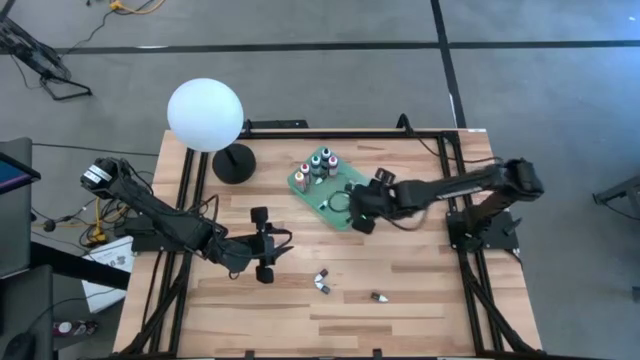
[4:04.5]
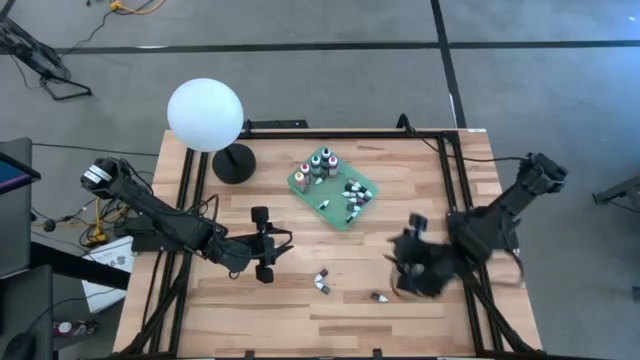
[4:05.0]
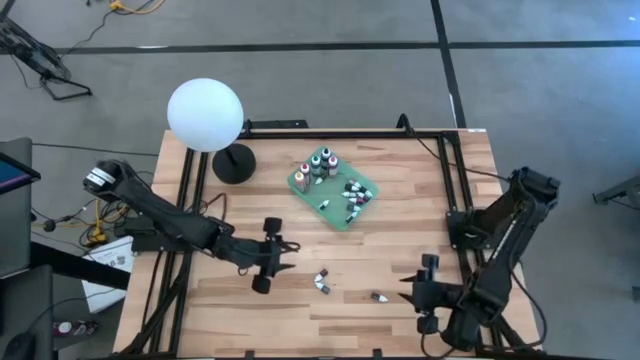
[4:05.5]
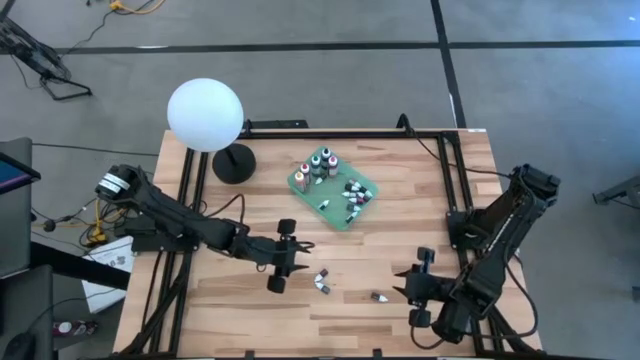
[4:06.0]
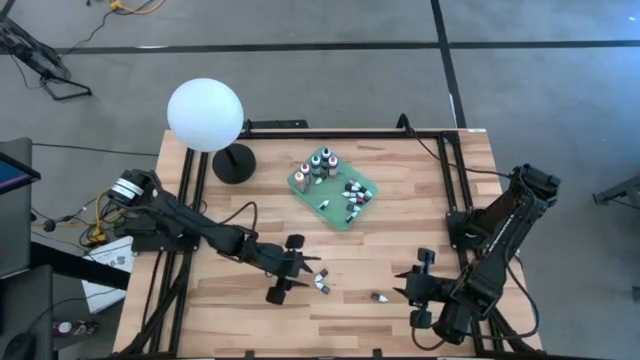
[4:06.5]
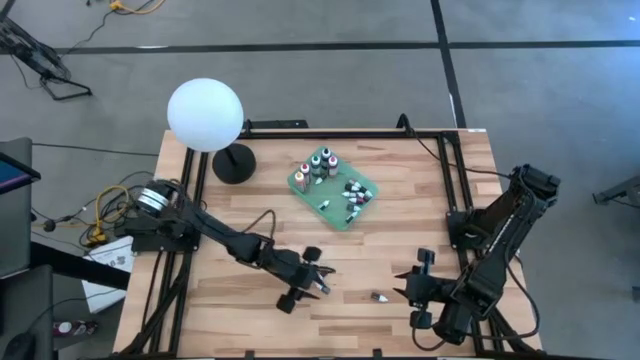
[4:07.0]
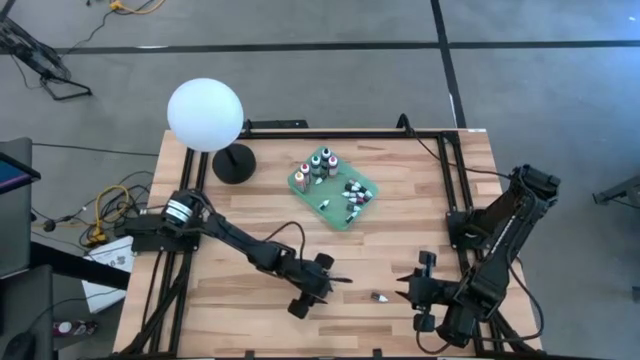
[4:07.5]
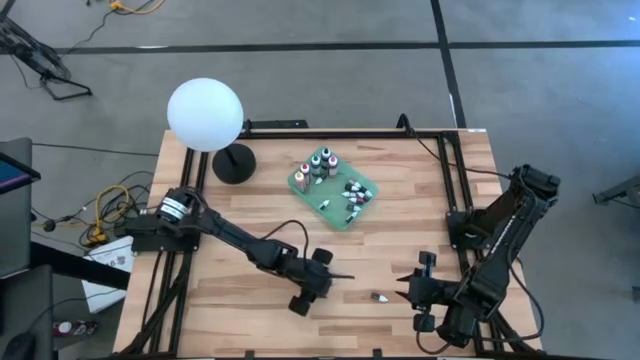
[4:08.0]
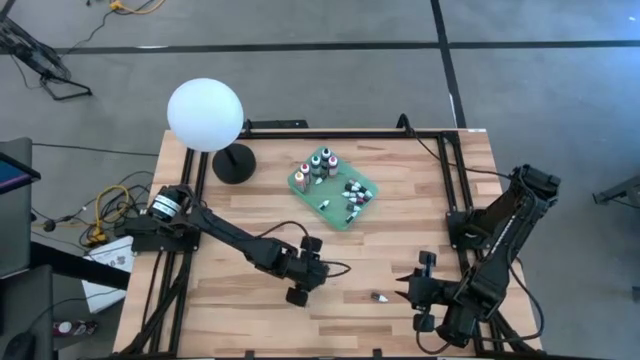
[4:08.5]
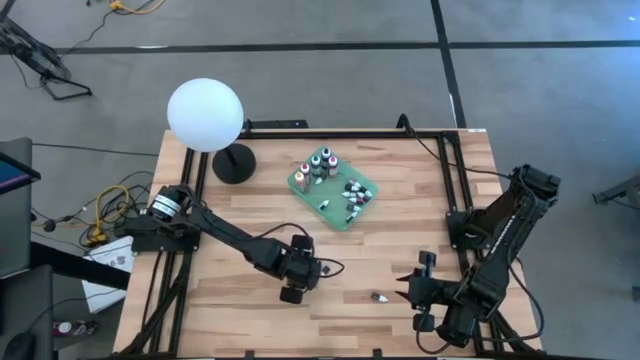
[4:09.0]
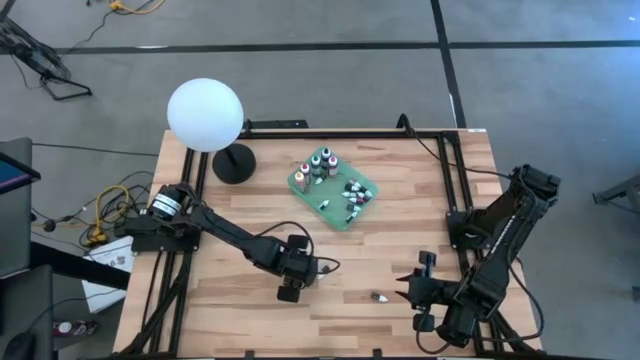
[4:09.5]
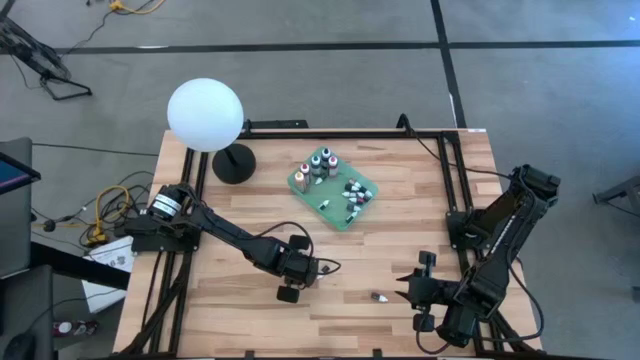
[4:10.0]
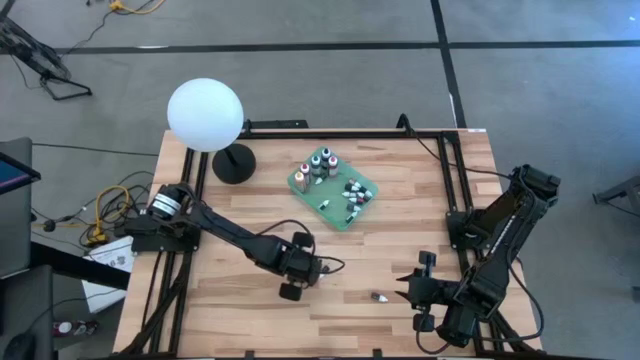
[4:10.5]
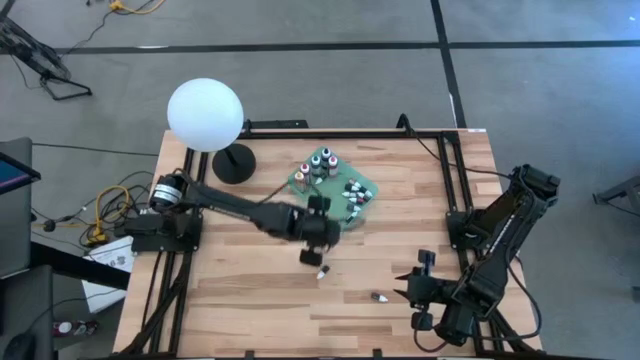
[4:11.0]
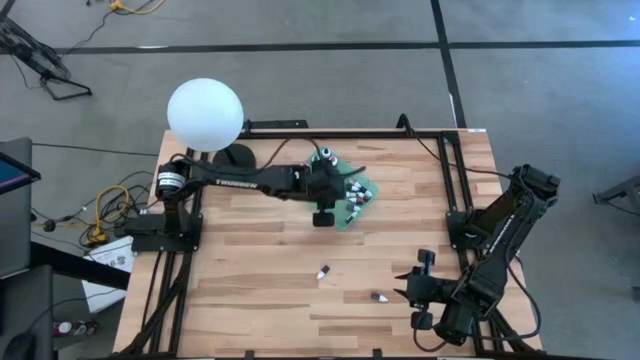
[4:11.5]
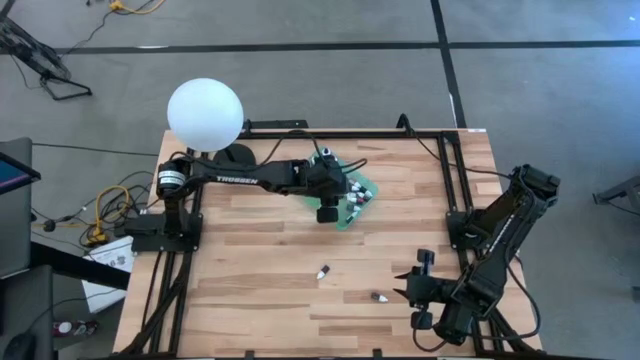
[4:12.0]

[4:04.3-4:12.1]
Task: Pick & Place food coloring
Put the small purple food coloring bottle into the green bin

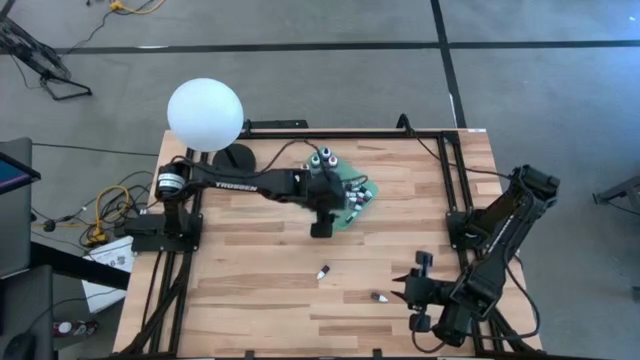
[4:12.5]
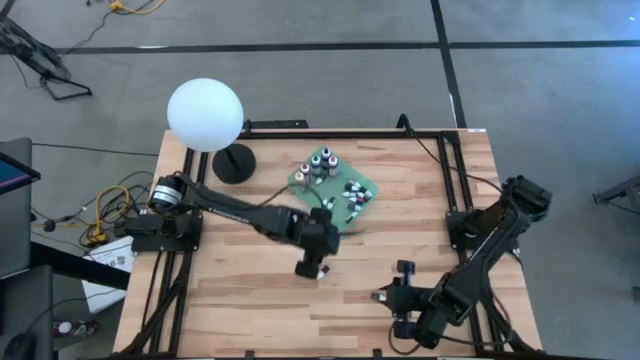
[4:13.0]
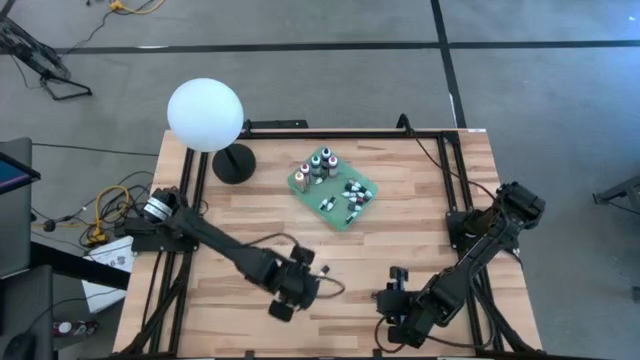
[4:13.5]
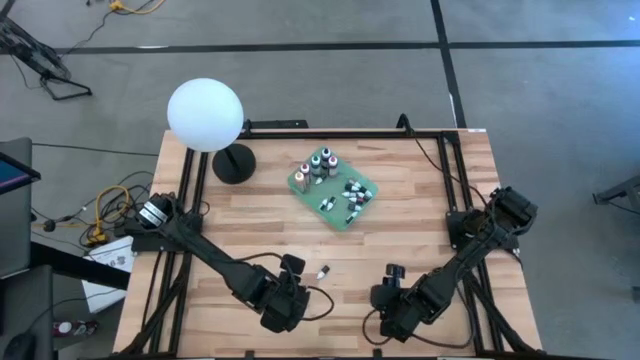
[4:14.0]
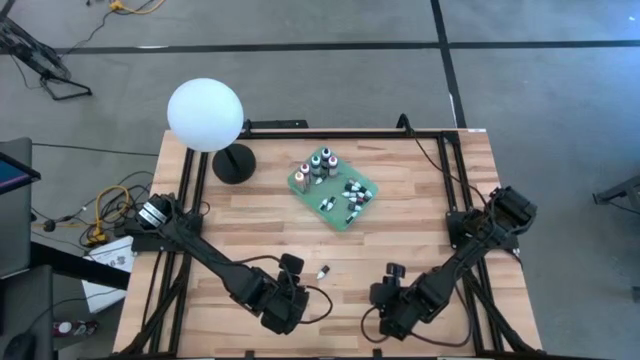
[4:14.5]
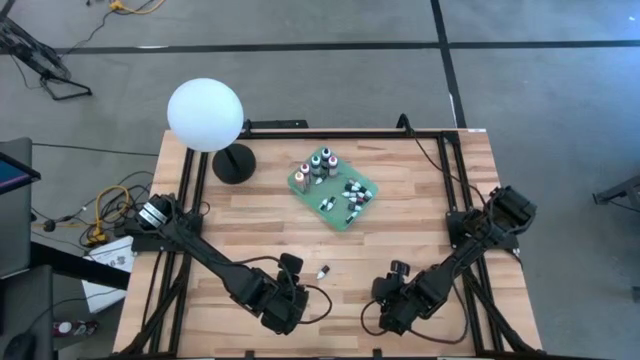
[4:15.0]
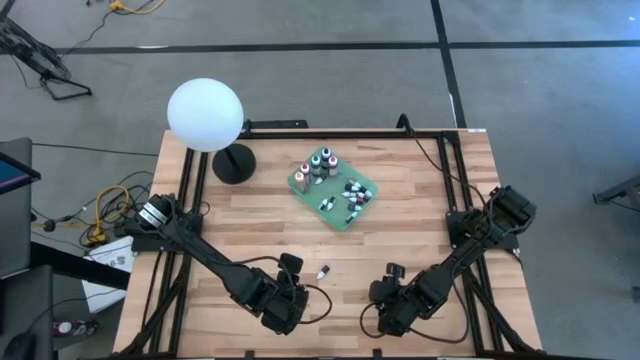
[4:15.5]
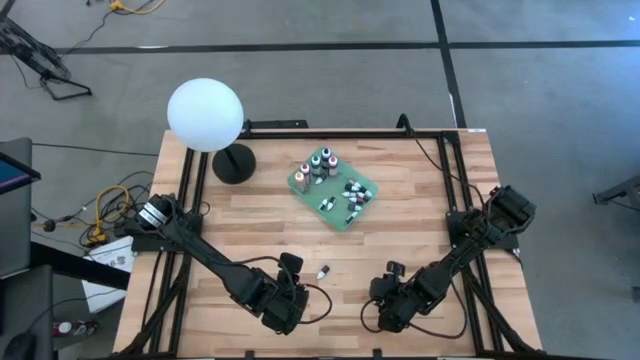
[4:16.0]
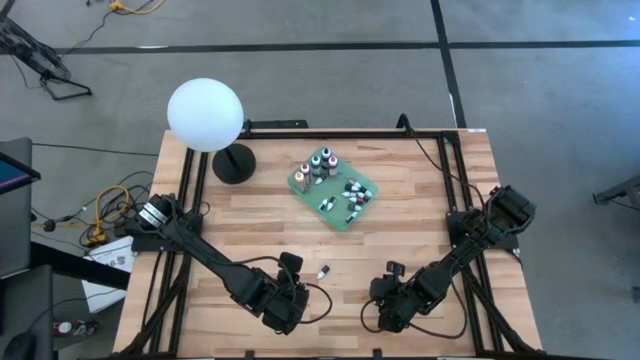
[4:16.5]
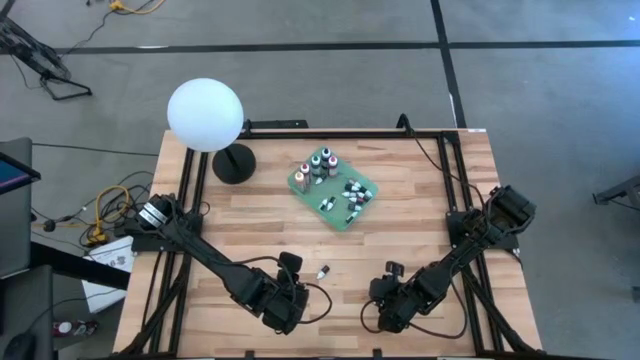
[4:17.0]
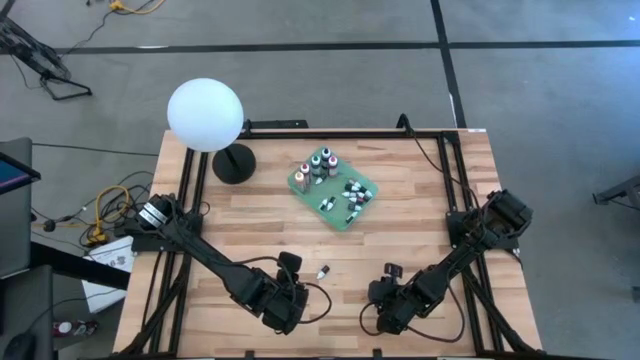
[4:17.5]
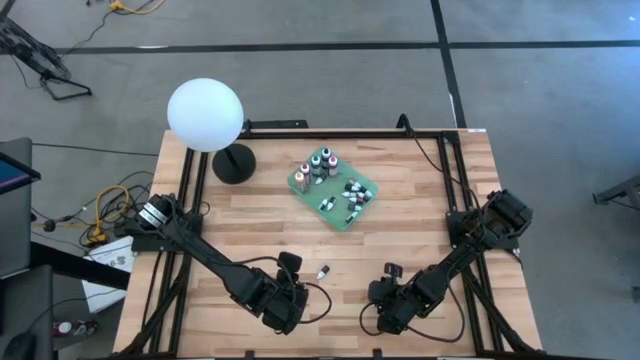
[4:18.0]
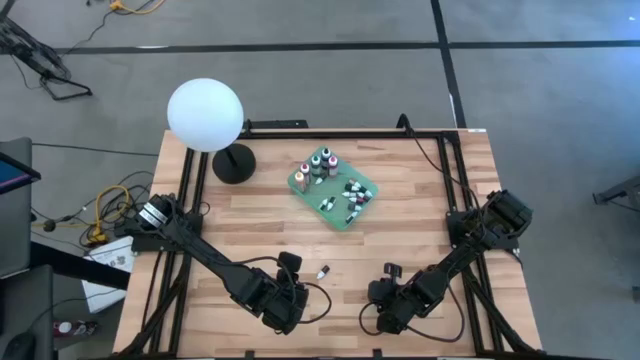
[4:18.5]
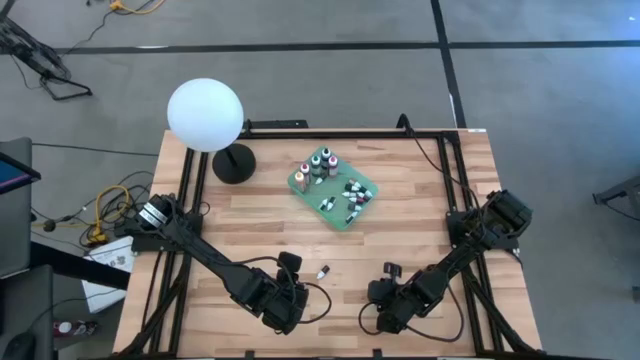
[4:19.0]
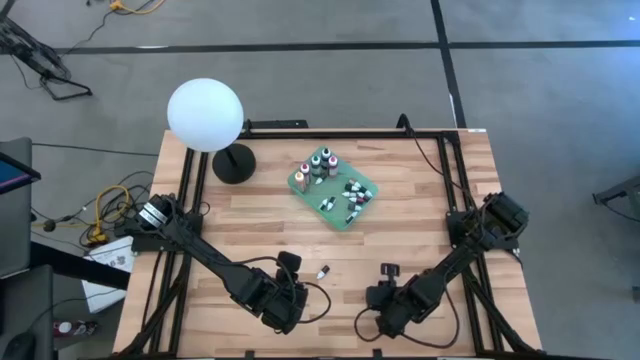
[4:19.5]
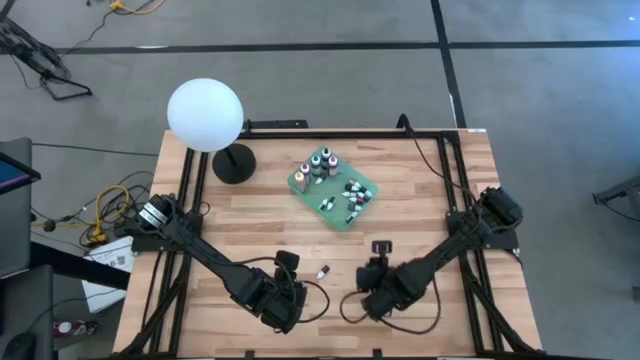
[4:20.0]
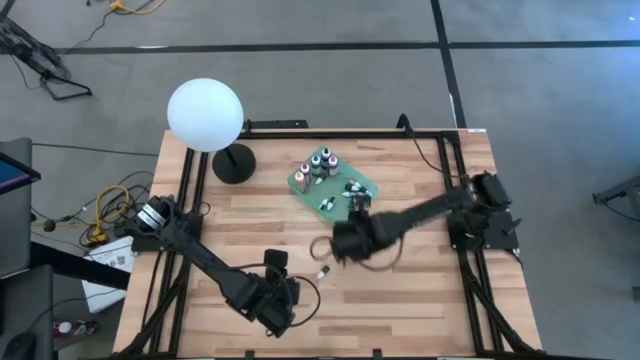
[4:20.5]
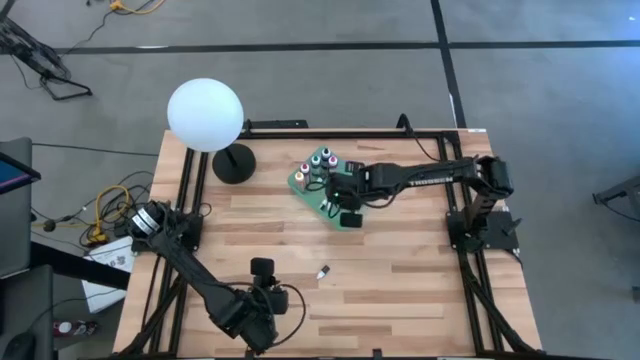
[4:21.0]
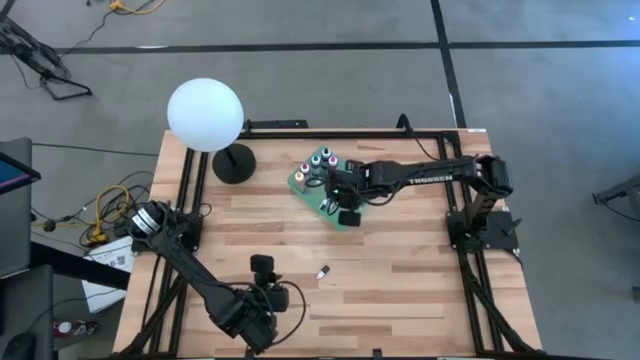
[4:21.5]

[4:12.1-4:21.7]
Put the small black food coloring bottle into the green bin

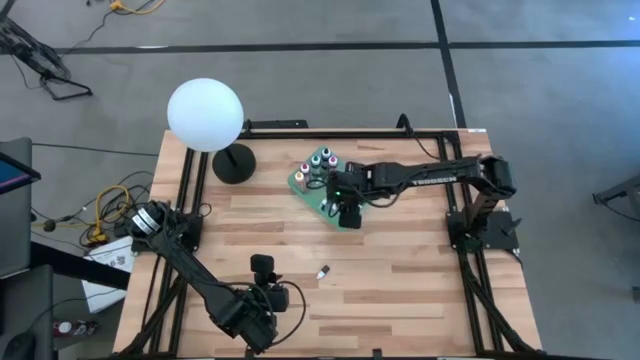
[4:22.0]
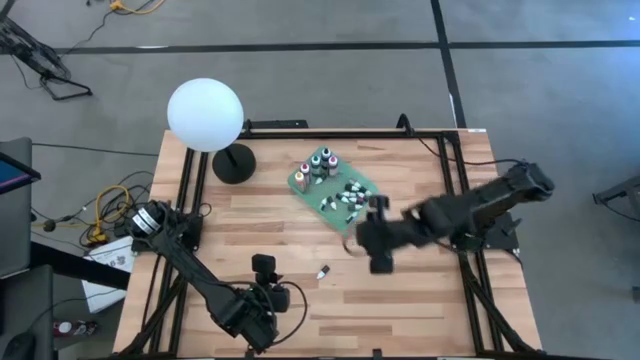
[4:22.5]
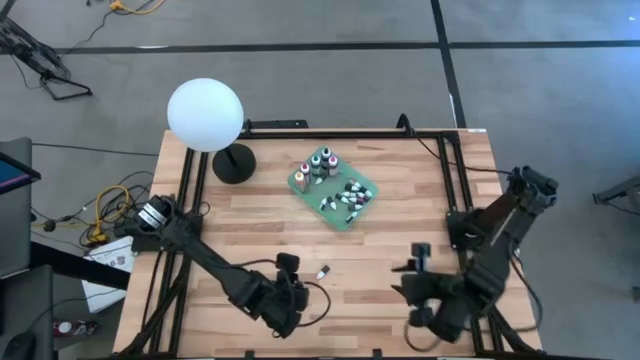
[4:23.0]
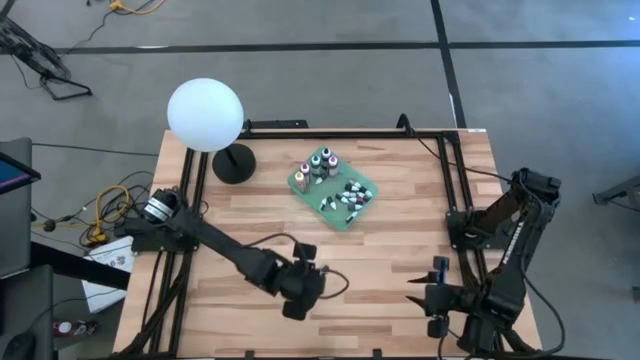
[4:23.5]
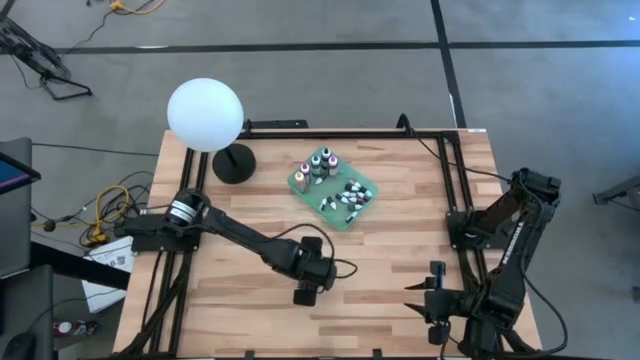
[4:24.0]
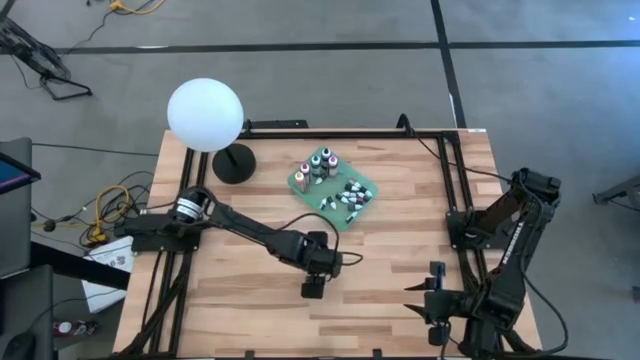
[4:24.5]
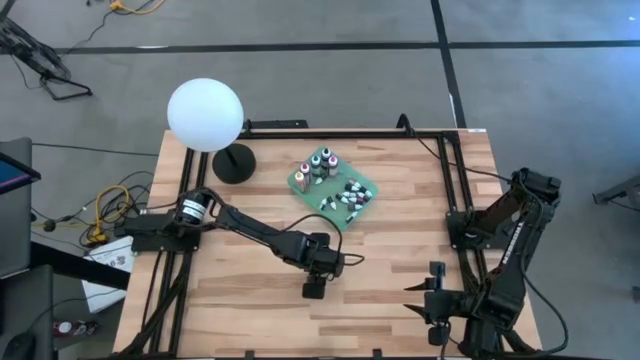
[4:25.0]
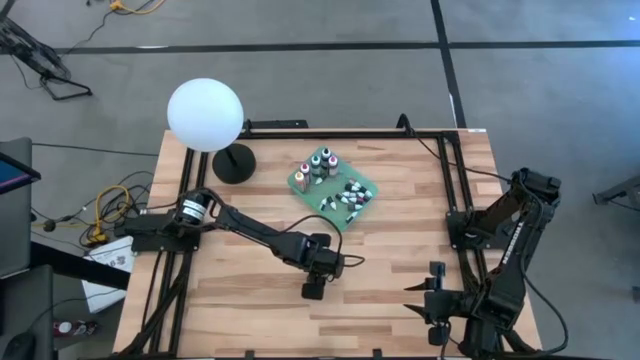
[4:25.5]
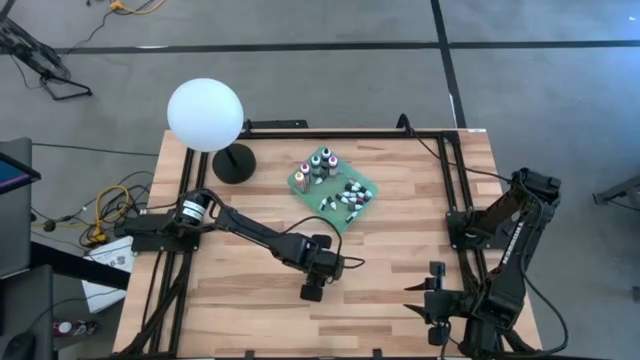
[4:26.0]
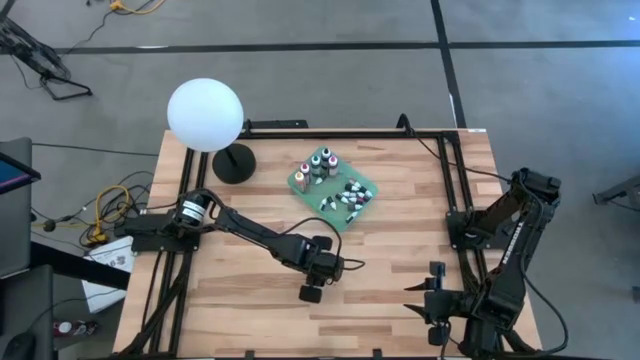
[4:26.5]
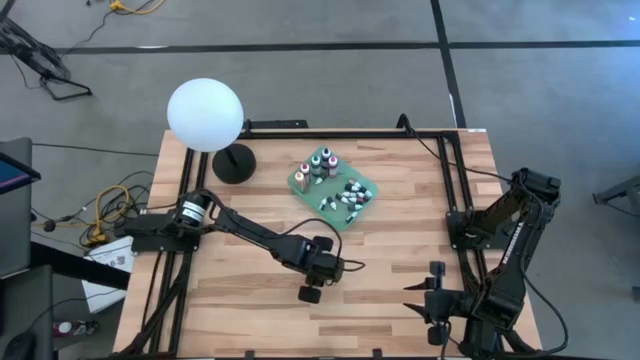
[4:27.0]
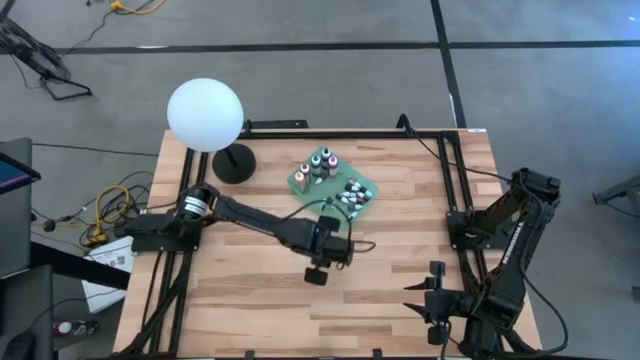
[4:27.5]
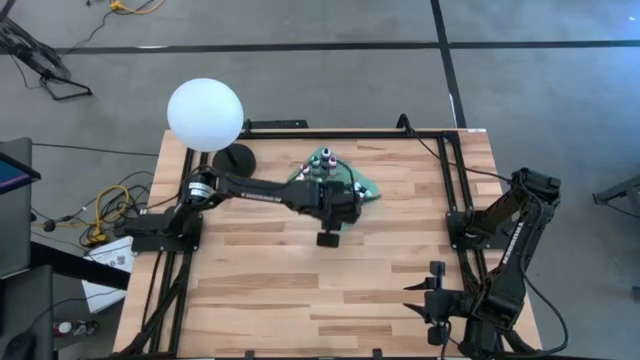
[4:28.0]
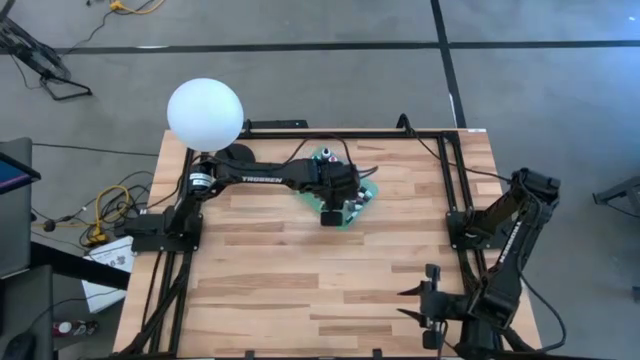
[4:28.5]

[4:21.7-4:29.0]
Put the small red food coloring bottle into the green bin
